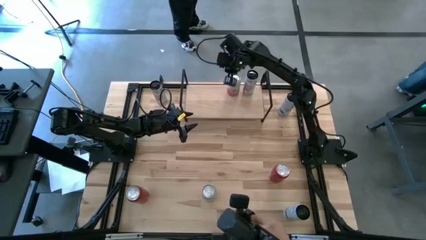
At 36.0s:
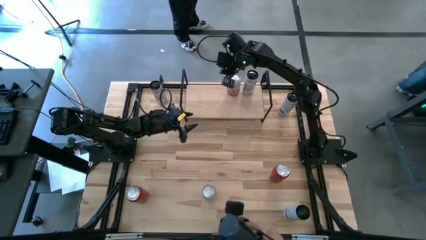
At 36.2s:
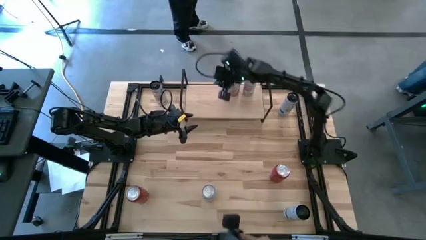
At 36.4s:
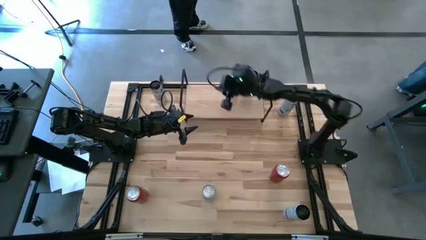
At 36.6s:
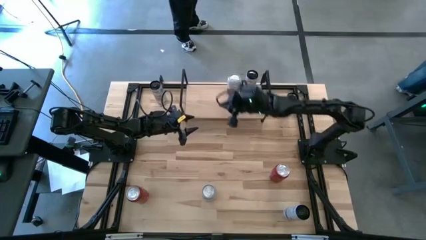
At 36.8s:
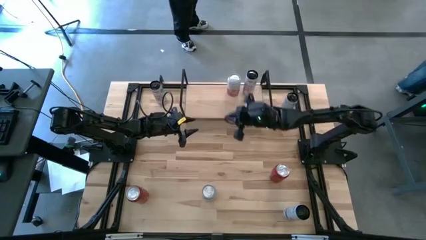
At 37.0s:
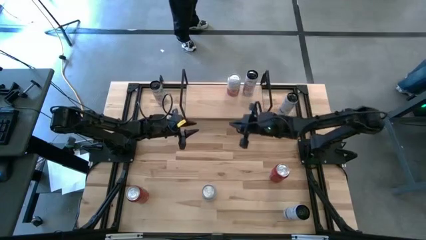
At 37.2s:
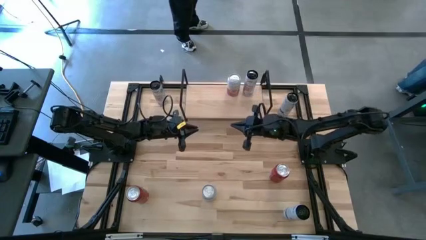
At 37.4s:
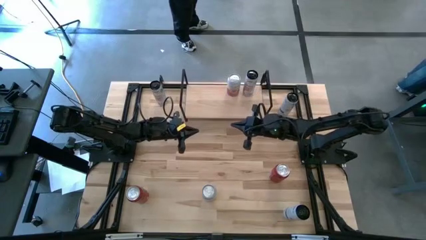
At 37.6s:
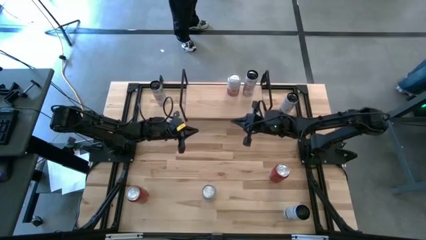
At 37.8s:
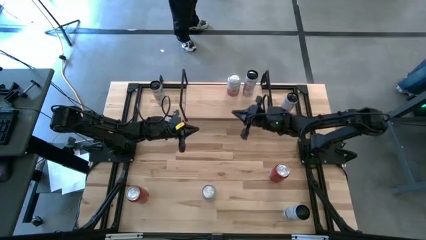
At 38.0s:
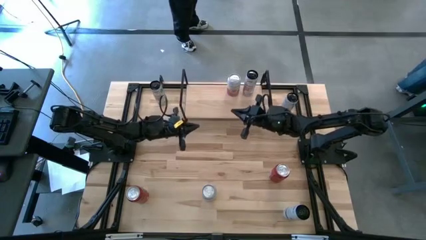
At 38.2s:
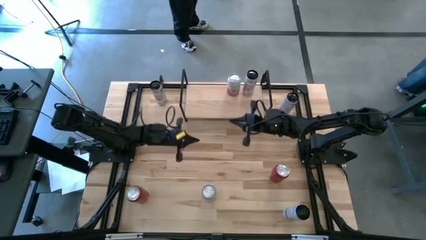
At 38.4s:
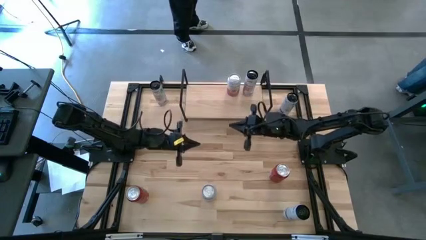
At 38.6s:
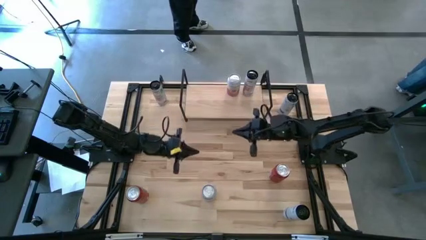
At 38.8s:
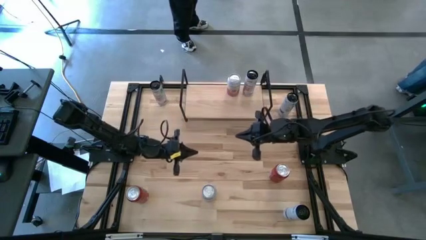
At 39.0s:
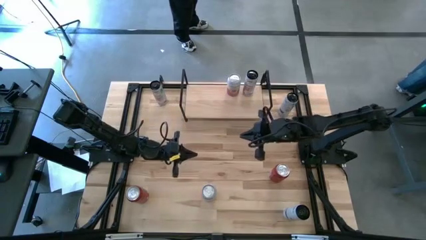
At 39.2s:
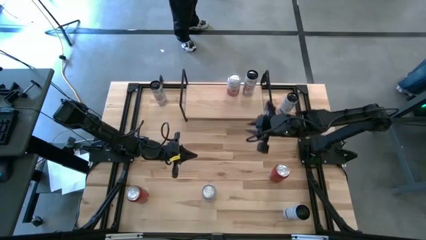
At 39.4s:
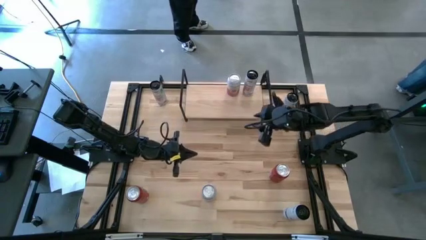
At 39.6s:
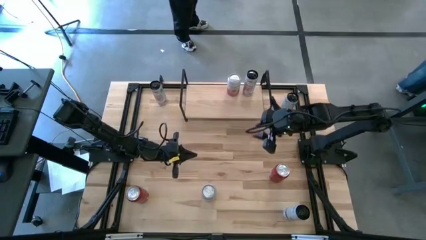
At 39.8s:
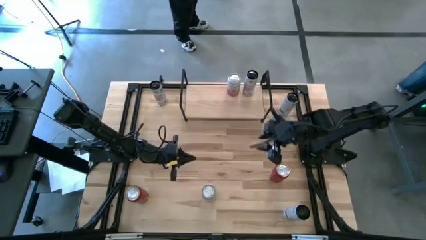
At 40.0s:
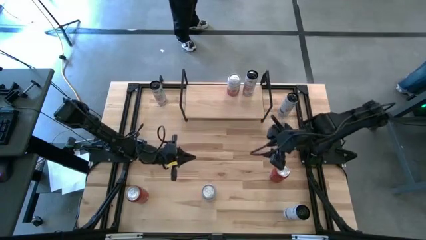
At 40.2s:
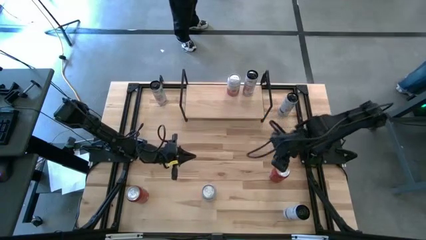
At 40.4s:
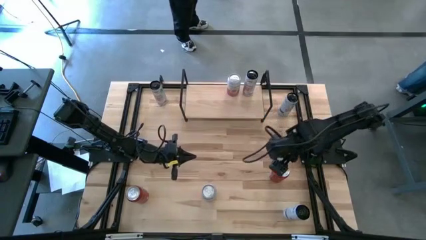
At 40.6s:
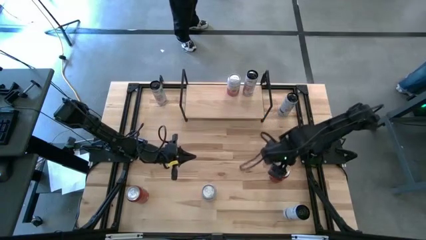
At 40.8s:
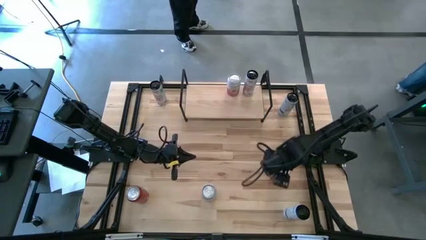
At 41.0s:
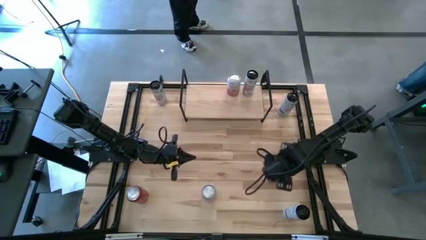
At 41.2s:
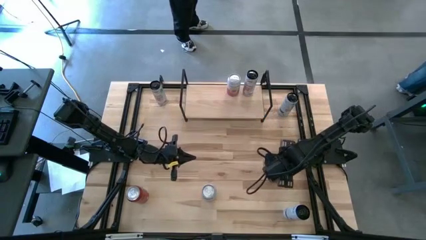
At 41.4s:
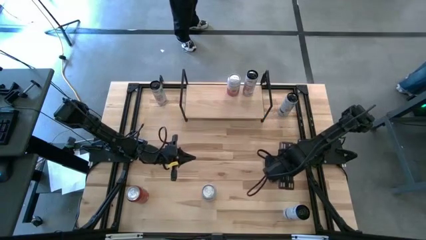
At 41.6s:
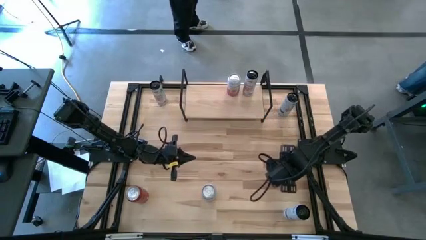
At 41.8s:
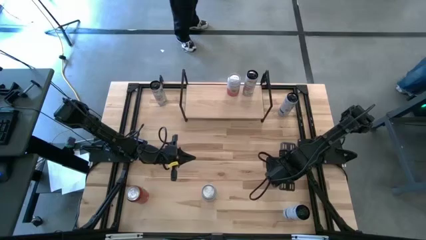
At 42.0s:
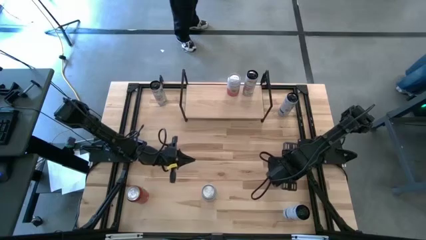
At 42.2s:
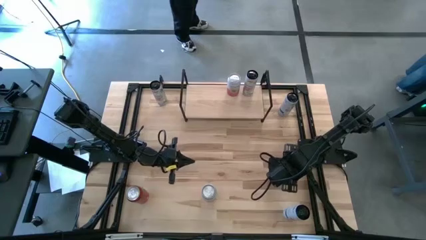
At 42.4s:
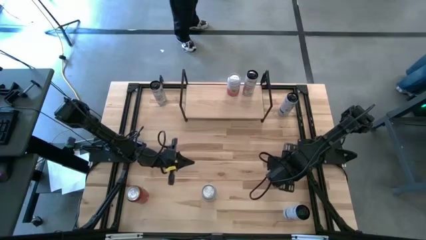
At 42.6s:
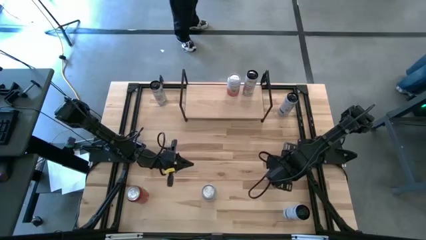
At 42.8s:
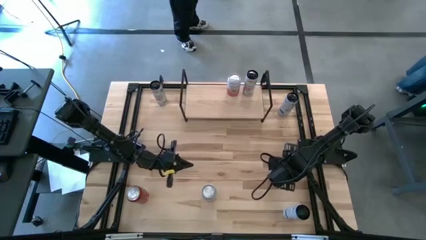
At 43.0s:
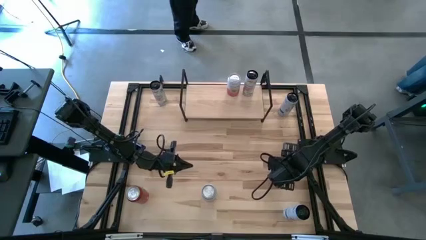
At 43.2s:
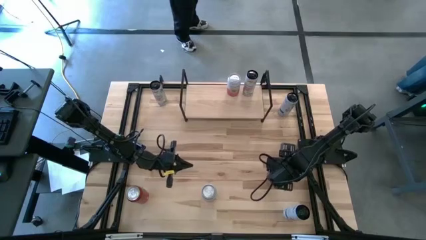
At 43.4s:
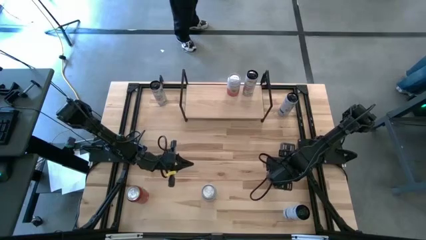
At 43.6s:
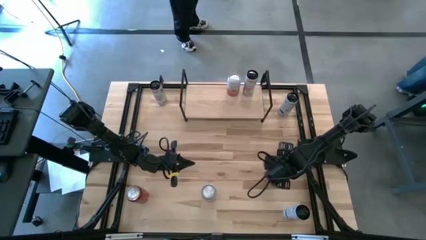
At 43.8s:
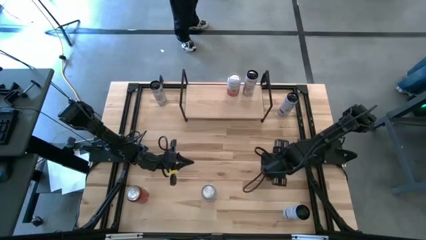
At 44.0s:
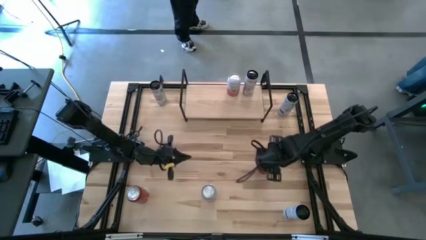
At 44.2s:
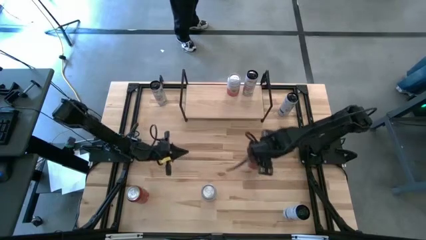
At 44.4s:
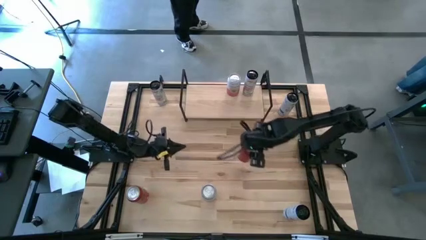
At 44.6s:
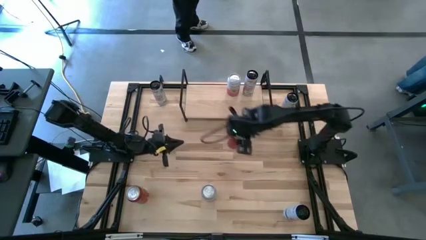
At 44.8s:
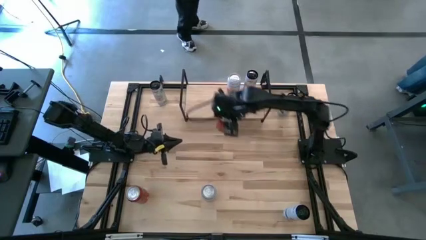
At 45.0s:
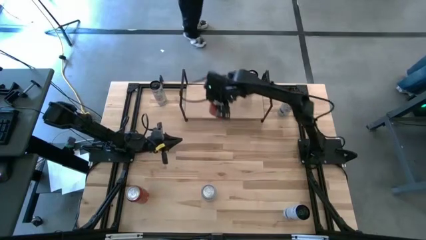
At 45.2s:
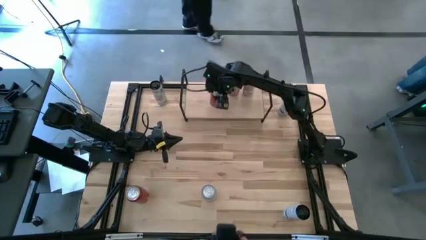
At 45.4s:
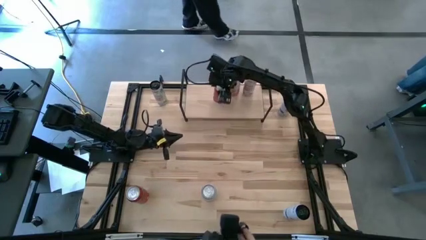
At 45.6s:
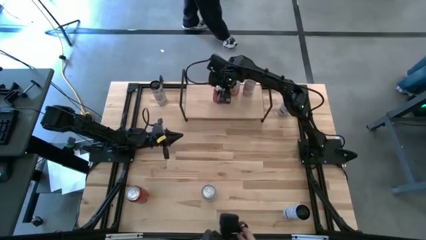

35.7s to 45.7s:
Task: Place canned beverage on shelf
Put the right red soda can on the shelf

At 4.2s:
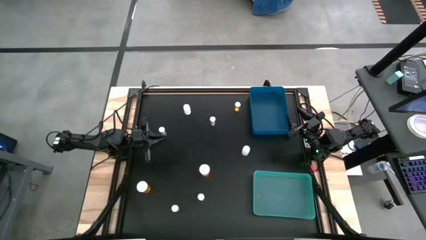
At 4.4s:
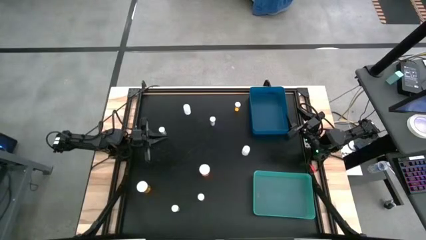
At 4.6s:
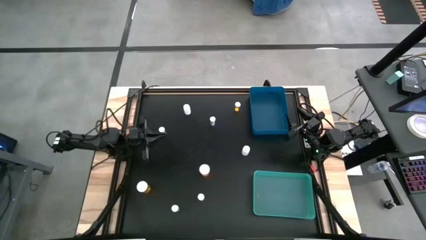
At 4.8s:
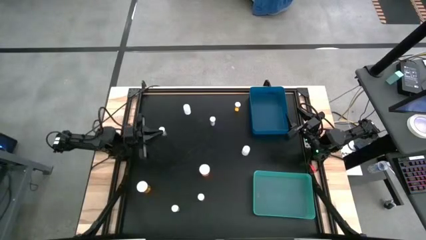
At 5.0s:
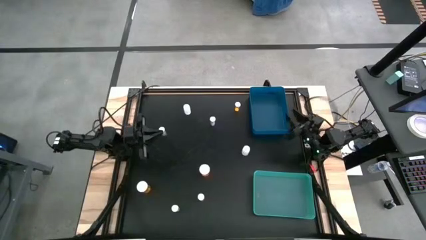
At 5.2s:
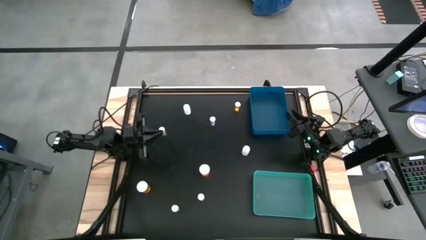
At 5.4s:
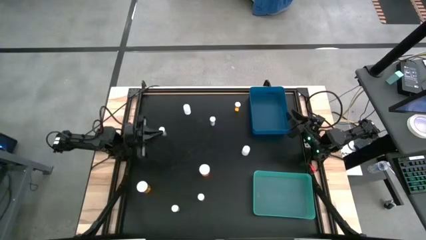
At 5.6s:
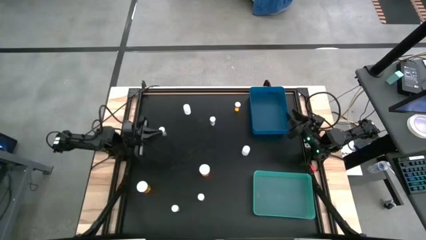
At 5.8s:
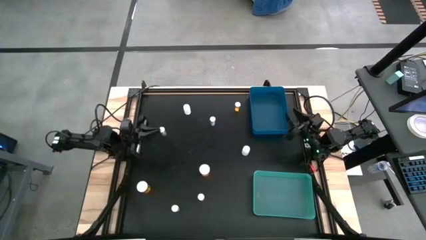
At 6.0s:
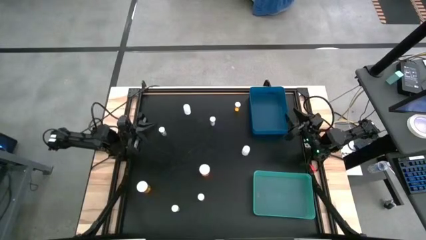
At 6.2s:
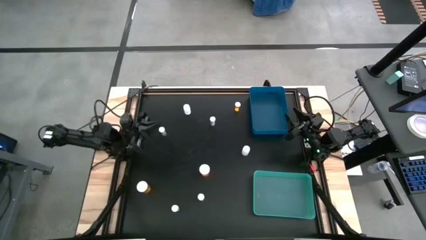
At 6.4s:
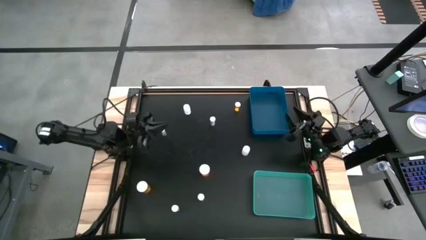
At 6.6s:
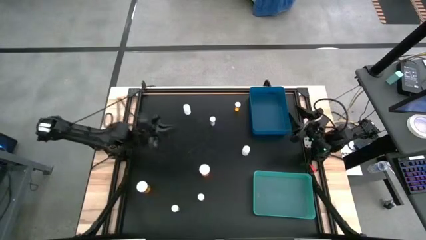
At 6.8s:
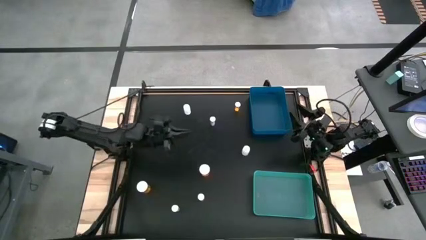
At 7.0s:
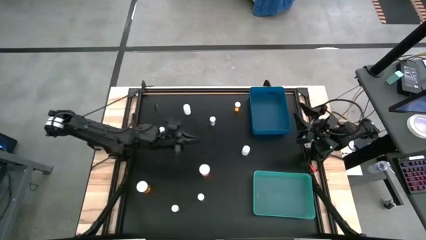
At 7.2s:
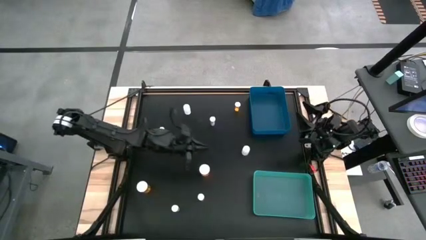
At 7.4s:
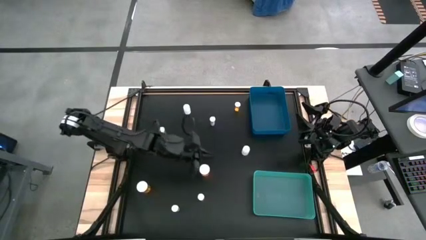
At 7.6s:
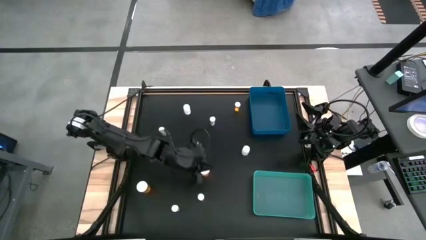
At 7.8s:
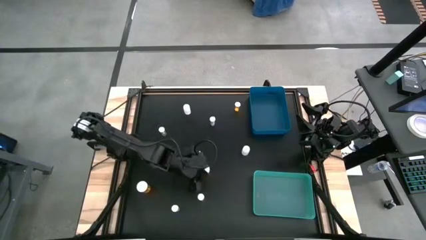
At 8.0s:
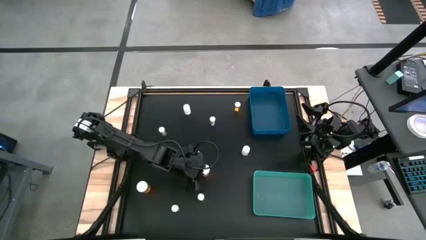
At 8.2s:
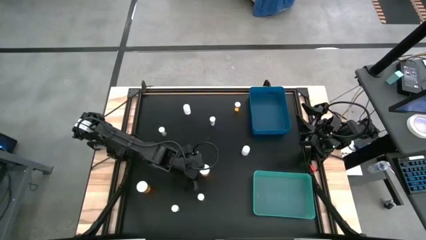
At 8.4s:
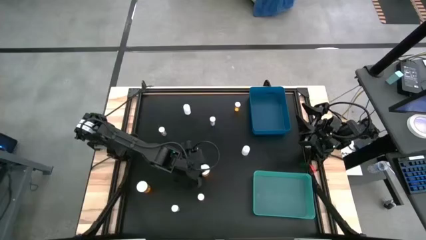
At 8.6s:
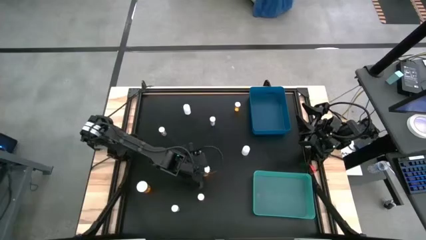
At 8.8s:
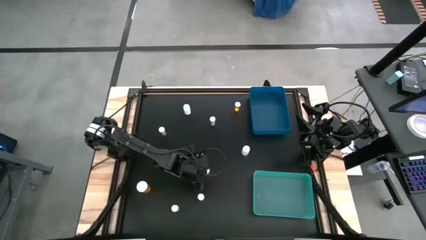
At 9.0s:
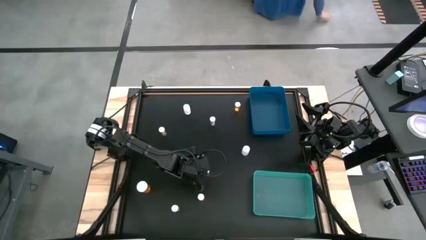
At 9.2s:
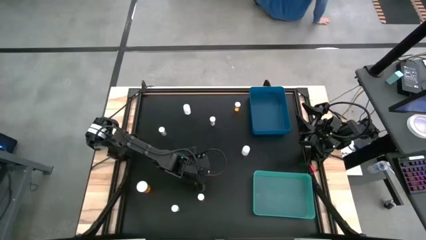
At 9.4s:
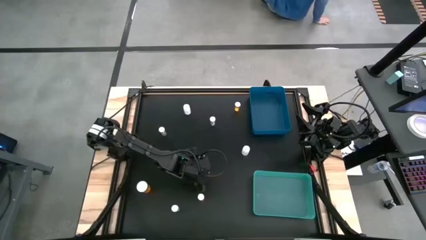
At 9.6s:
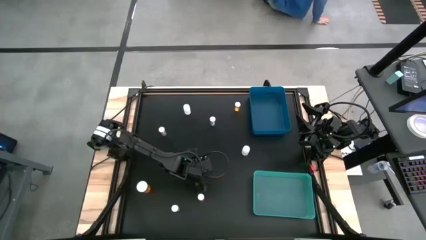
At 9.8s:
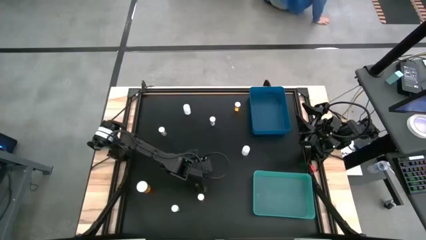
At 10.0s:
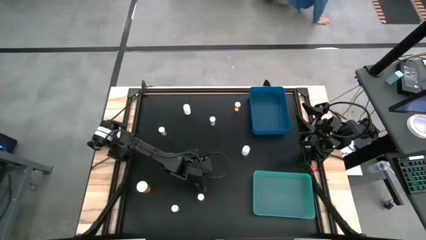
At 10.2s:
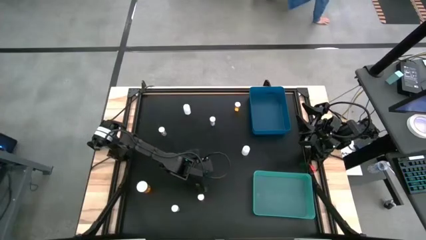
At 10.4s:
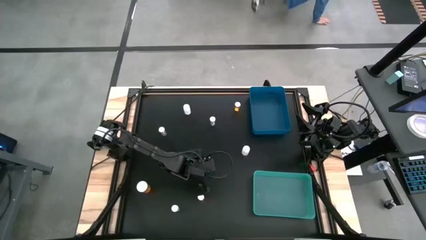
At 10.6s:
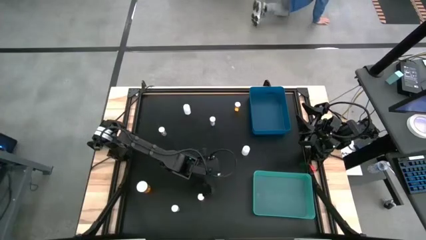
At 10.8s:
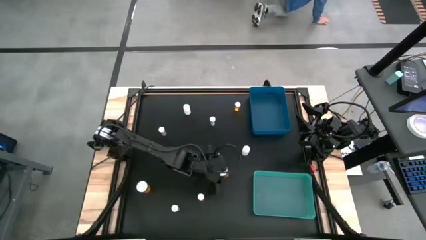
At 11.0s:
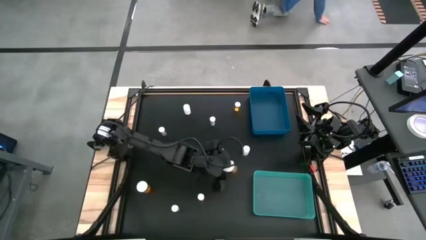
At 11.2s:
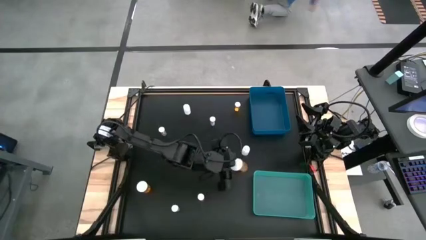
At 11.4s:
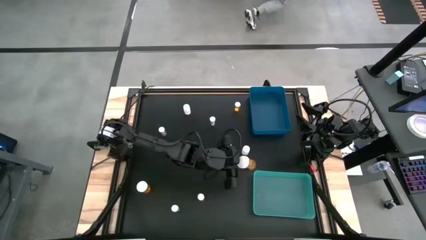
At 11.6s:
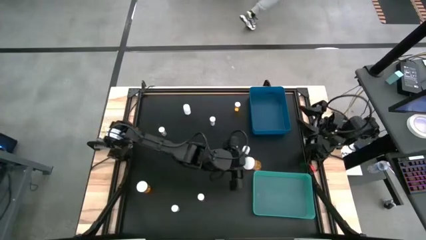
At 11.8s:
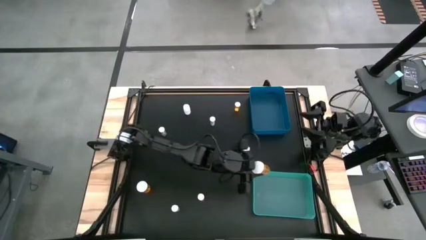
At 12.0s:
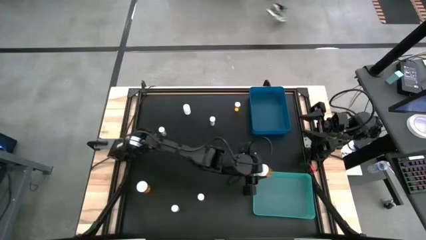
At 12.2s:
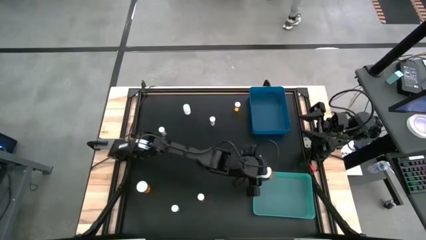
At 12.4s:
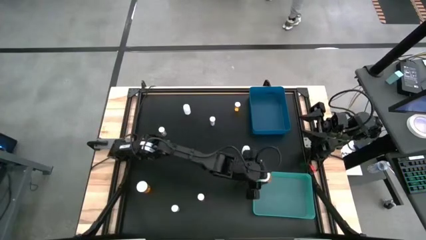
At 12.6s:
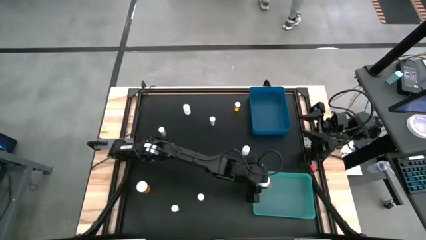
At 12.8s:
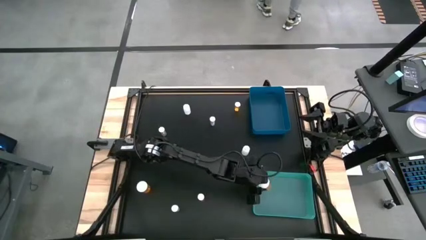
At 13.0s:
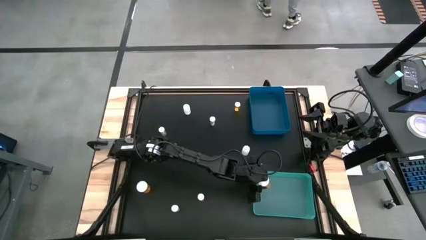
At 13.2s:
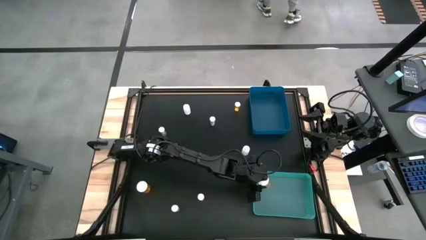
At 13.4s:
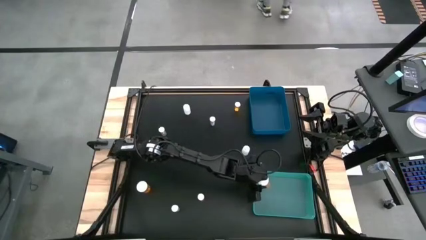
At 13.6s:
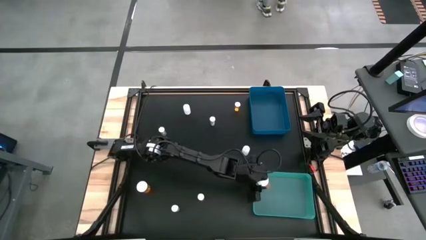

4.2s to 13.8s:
Task: Pick and place medicine bottles into bin by pill shape (circle, oval)
Put the bottom right orange pill bottle into the light green bin
